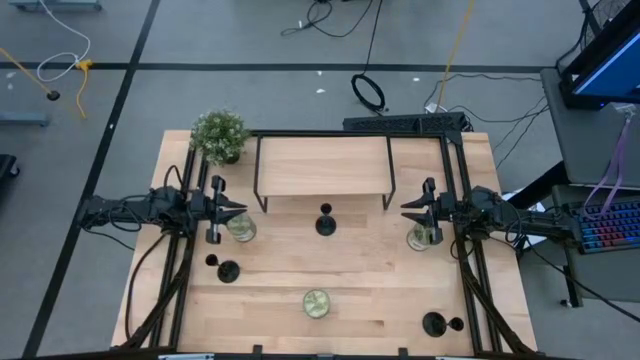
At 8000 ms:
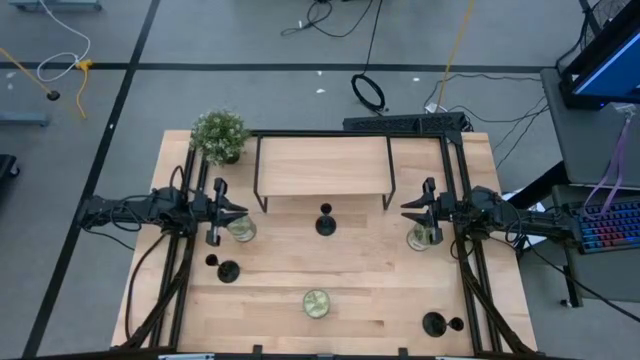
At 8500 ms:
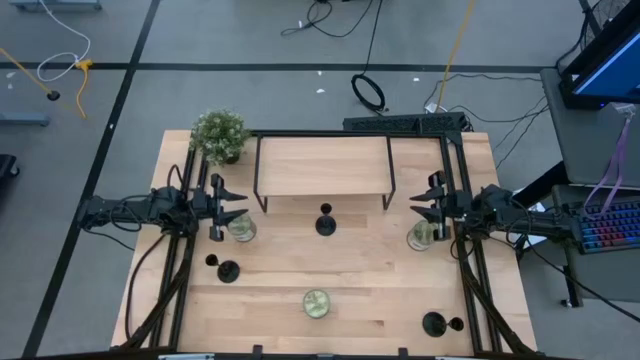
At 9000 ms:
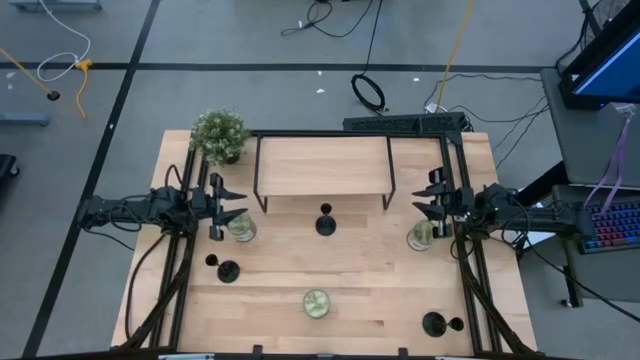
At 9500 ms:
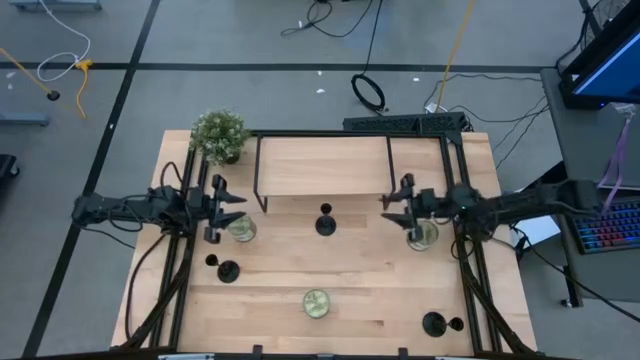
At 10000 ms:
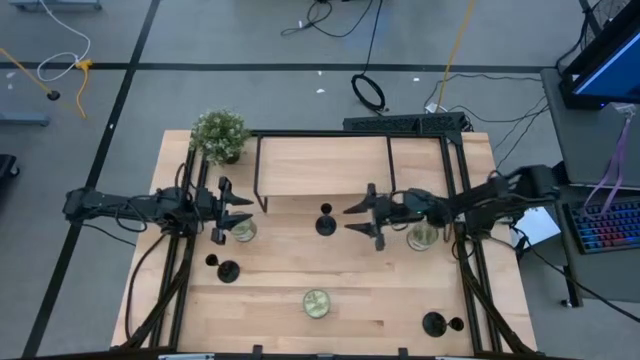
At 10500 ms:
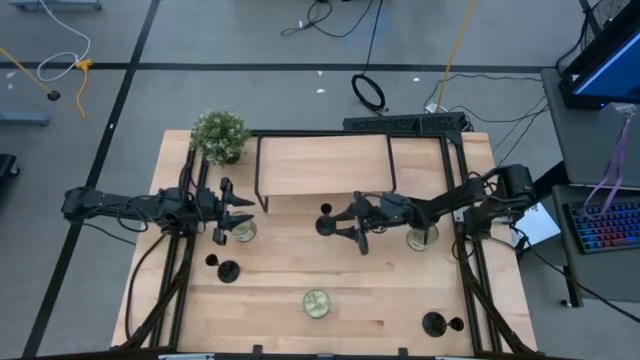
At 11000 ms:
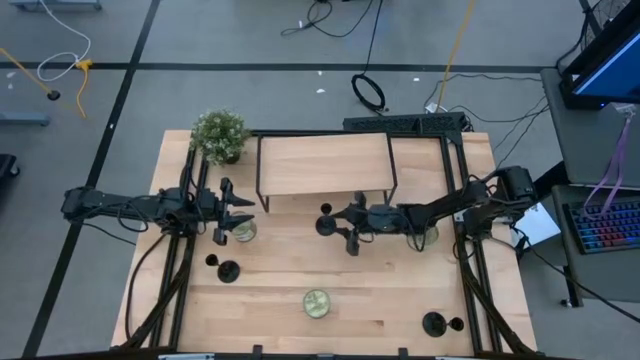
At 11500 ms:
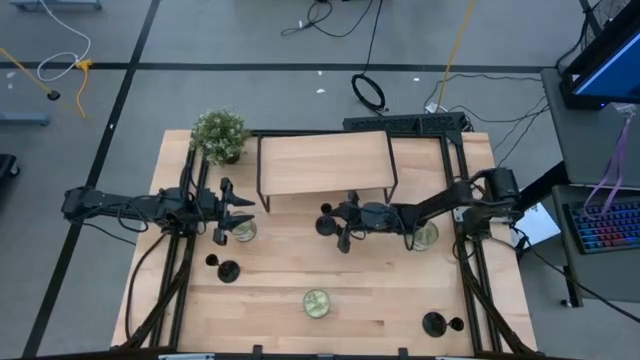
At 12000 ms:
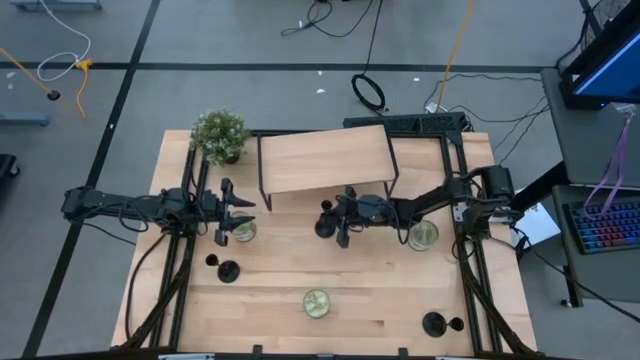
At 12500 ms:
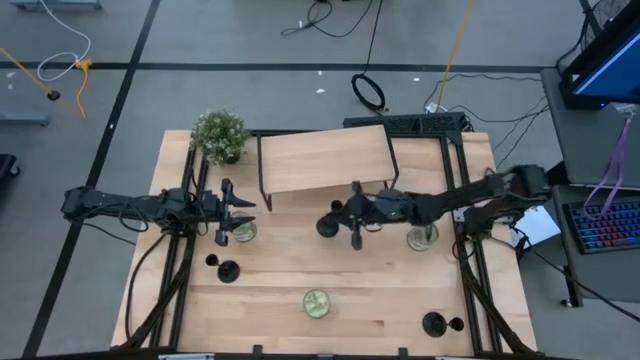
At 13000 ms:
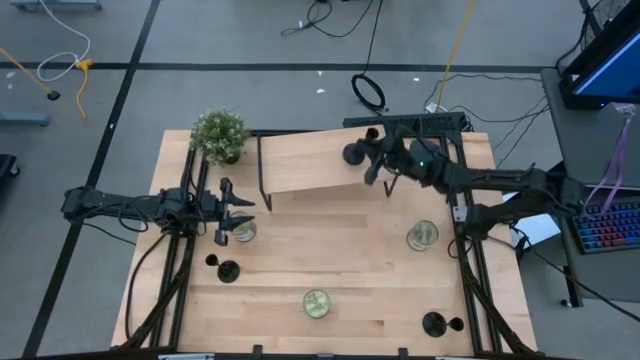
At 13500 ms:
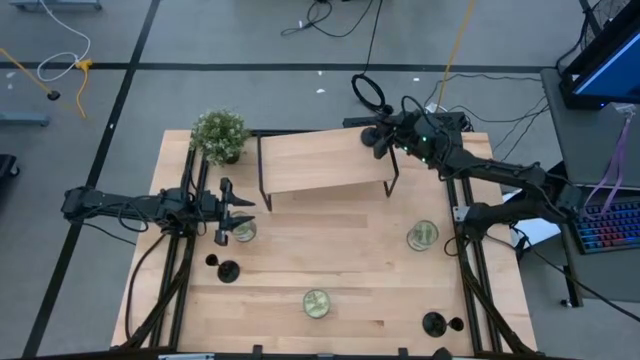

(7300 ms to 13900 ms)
Task: Pick & Place candle stick holders
Put the top black candle holder on the shelf

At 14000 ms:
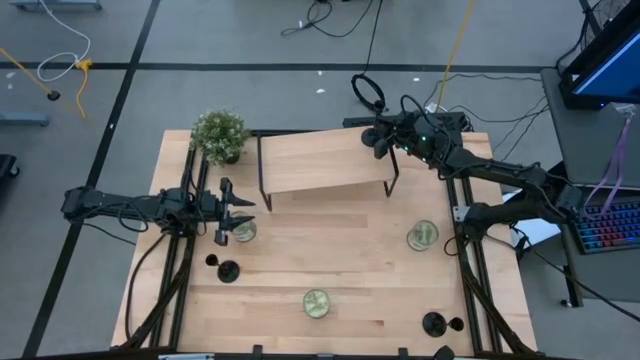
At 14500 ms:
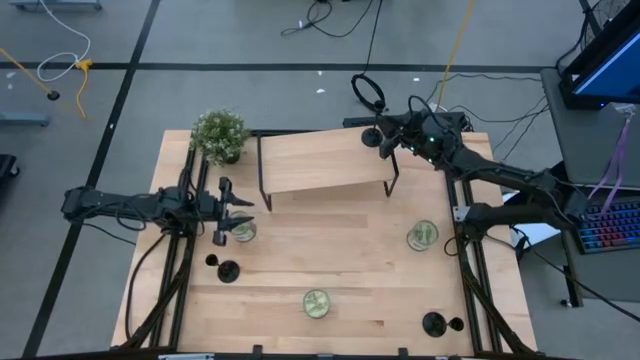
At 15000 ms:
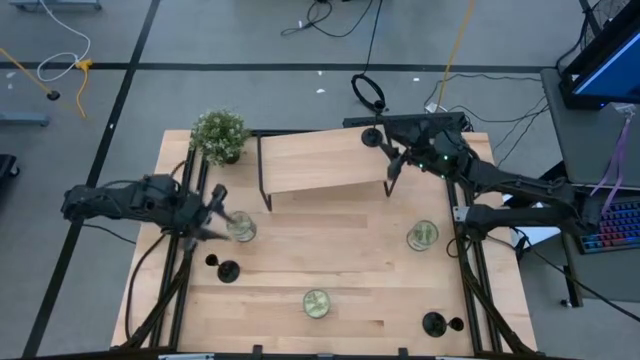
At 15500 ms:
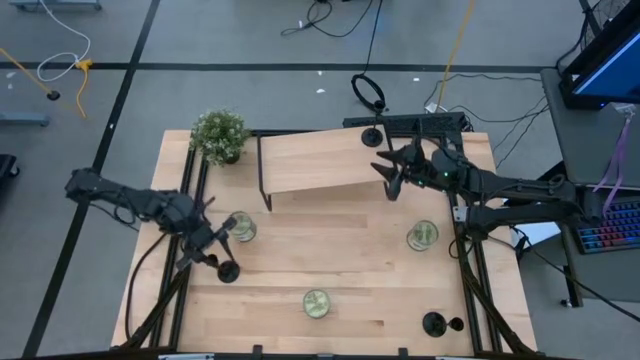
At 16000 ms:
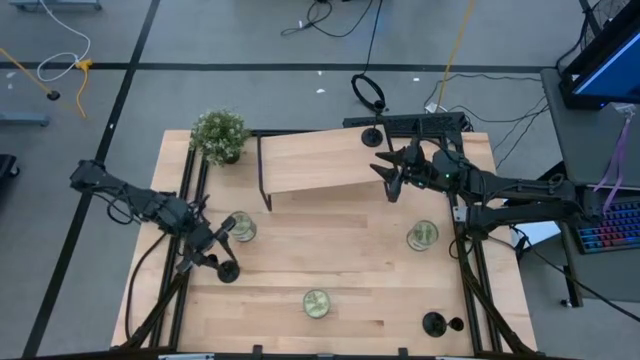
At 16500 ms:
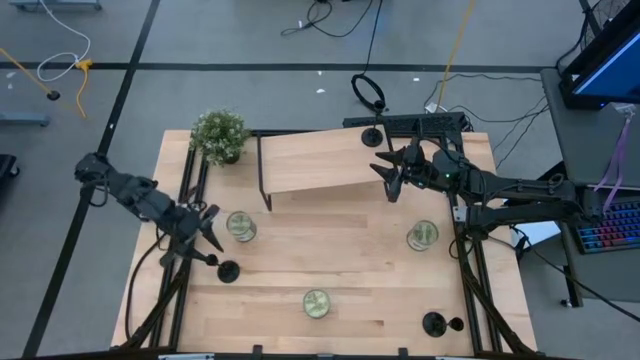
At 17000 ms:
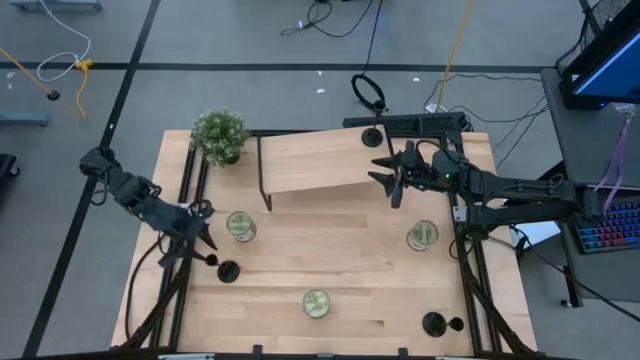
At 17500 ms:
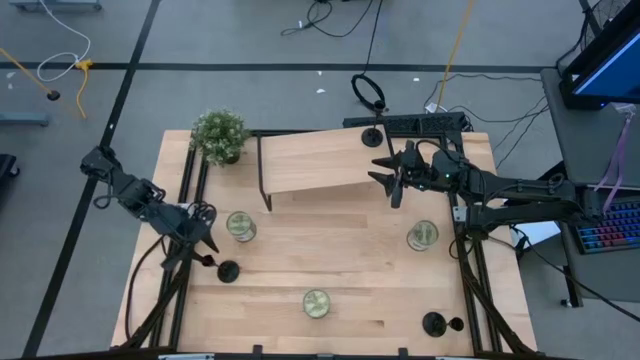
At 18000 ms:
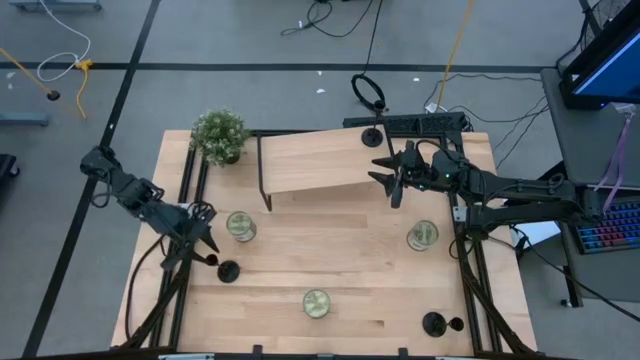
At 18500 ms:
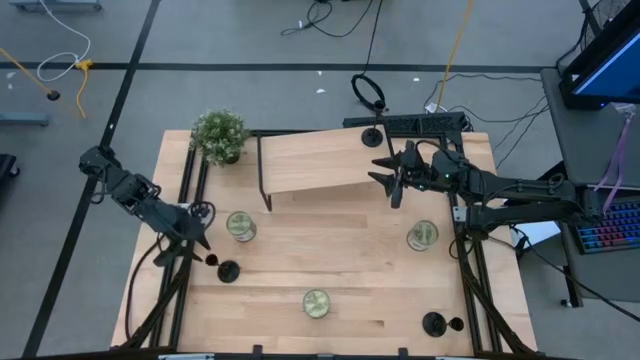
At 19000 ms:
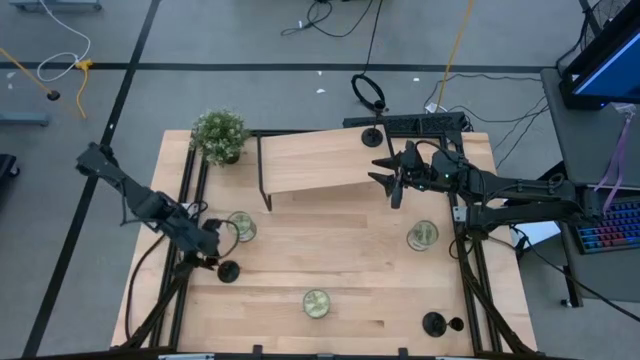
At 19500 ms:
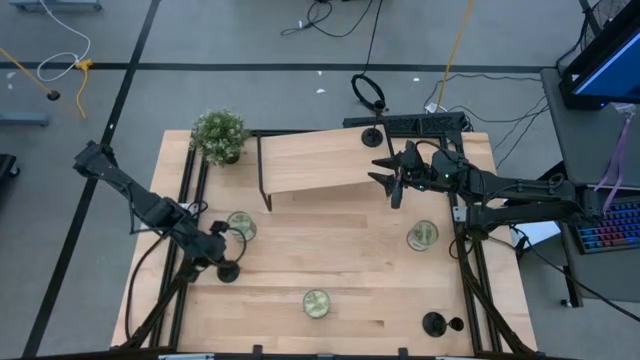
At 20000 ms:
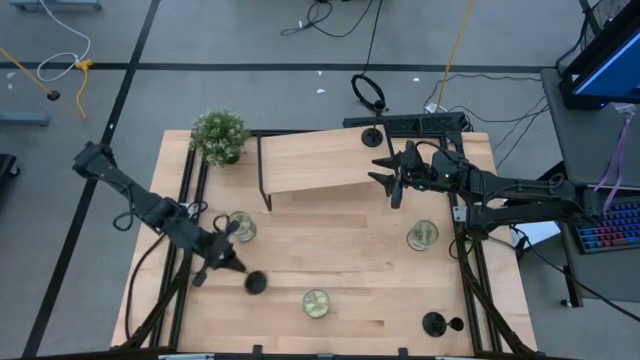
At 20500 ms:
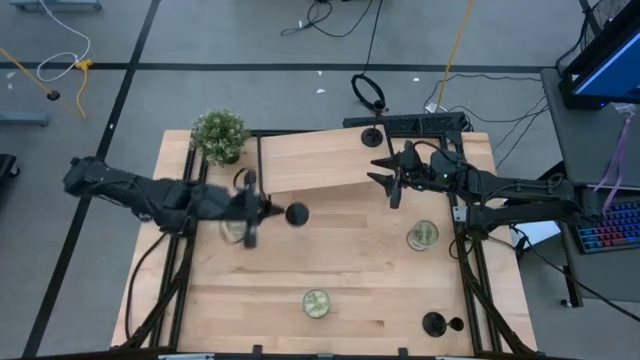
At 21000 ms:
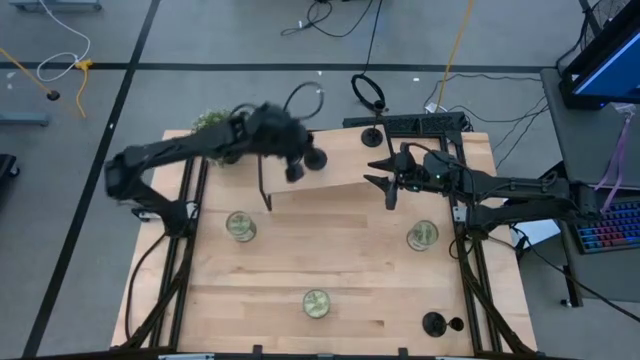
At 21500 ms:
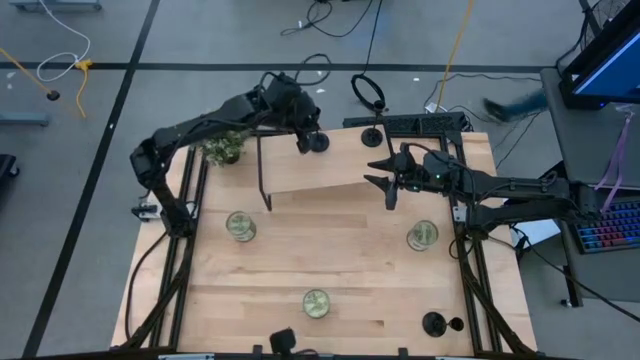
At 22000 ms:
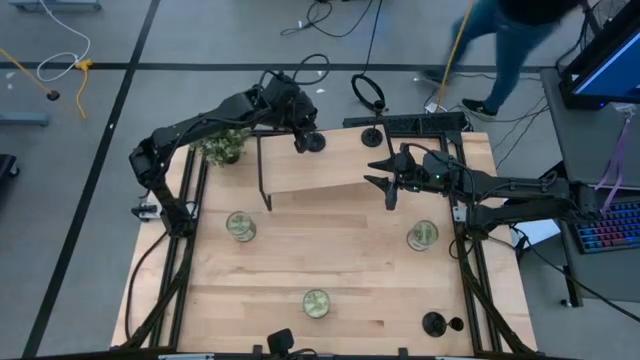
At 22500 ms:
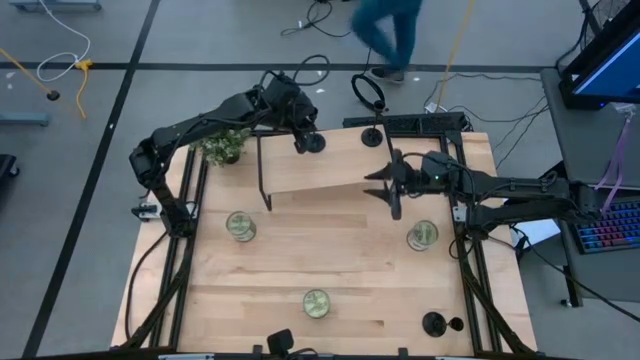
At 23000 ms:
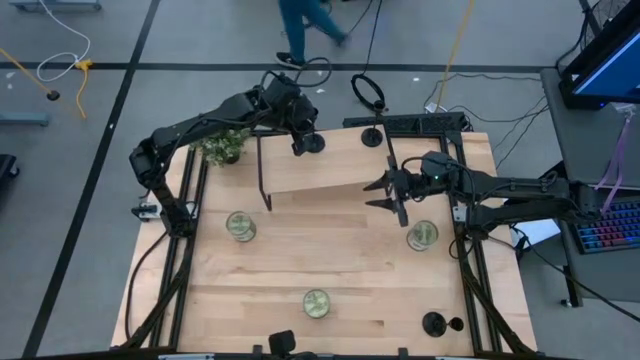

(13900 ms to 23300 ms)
Put the top black candle holder on the shelf aligned with the black candle holder

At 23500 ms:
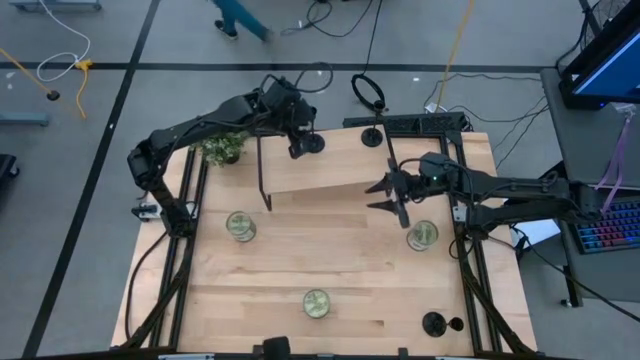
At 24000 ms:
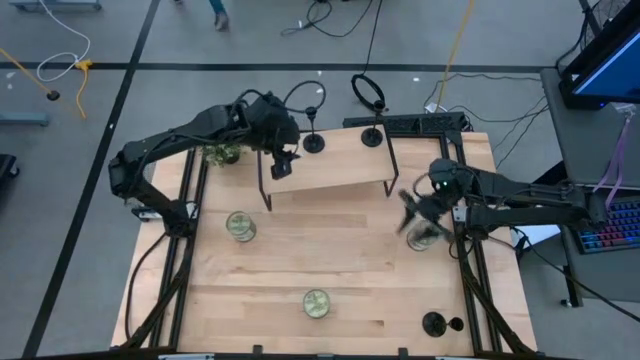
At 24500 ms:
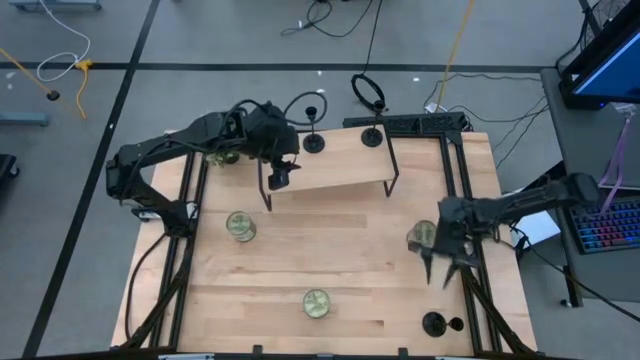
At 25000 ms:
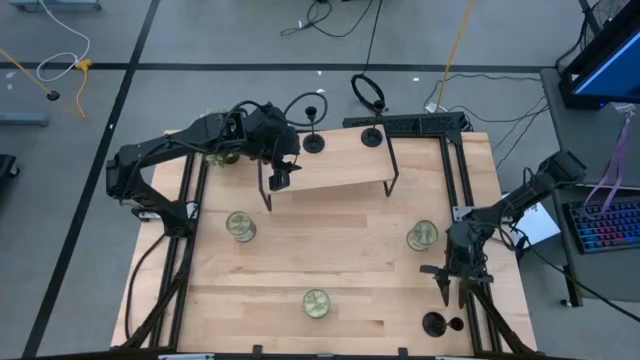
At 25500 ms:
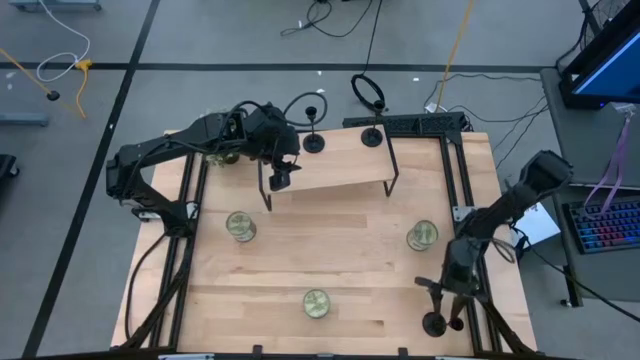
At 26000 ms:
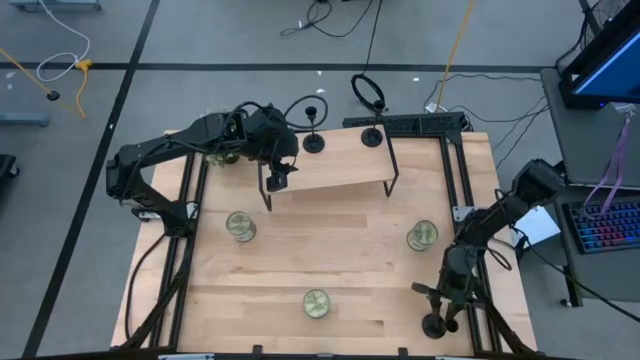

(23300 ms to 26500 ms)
Put the black candle holder on the shelf aligned with the black candle holders
